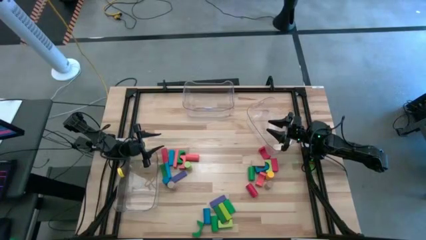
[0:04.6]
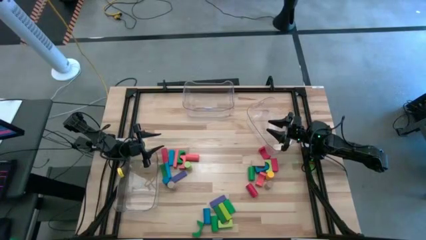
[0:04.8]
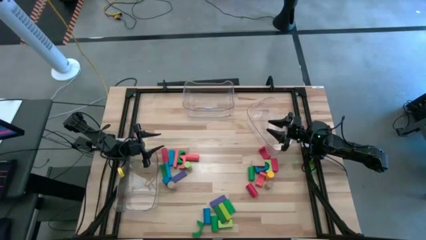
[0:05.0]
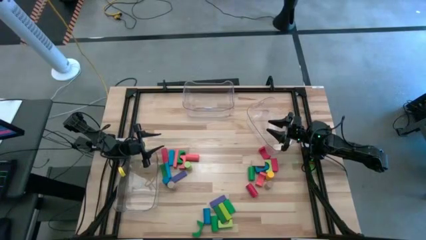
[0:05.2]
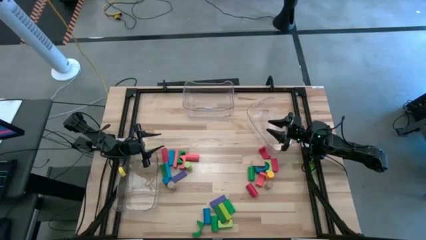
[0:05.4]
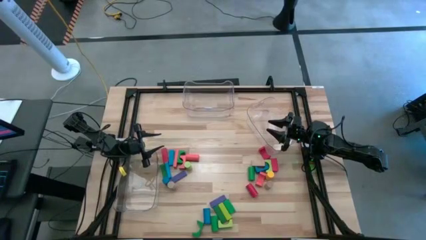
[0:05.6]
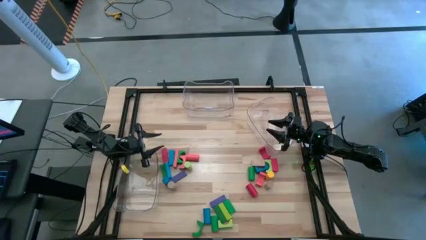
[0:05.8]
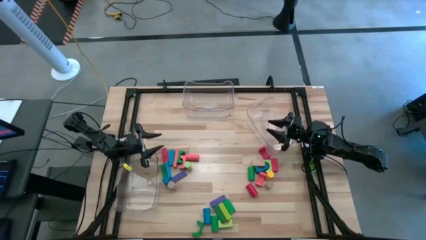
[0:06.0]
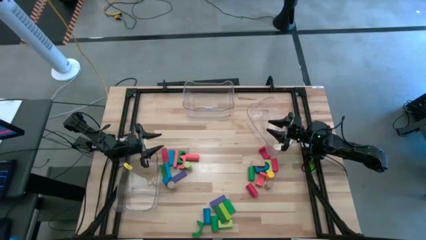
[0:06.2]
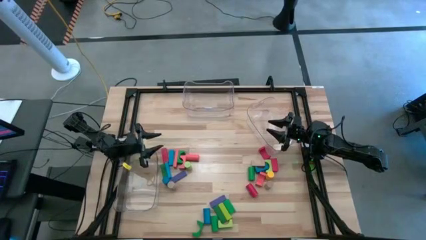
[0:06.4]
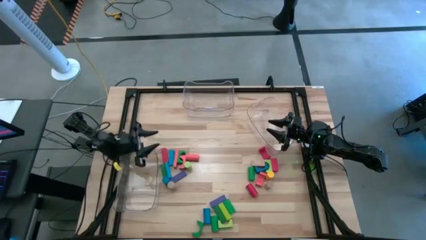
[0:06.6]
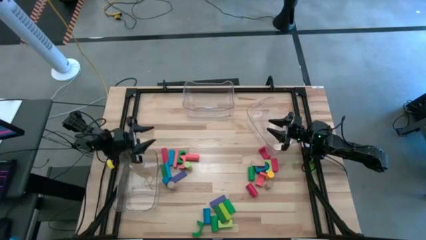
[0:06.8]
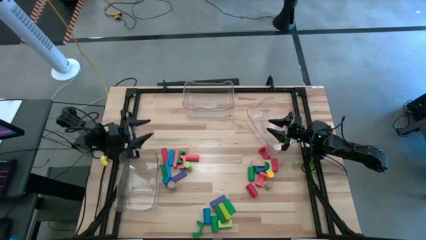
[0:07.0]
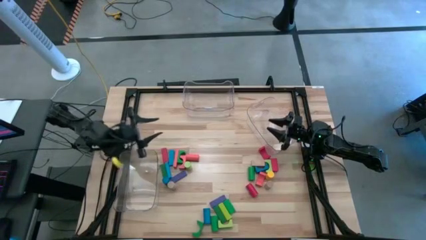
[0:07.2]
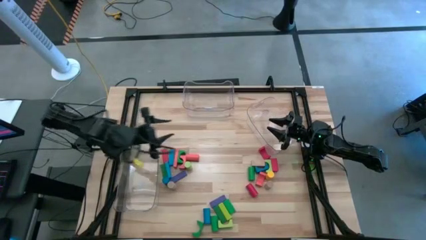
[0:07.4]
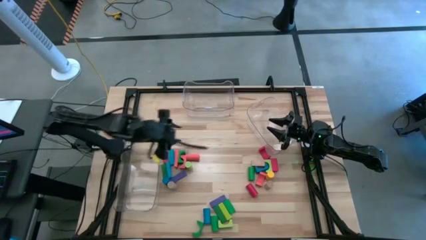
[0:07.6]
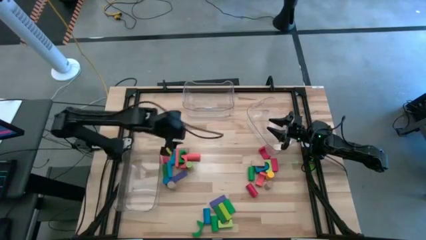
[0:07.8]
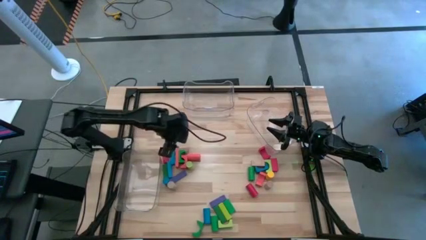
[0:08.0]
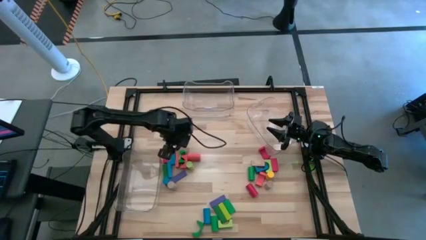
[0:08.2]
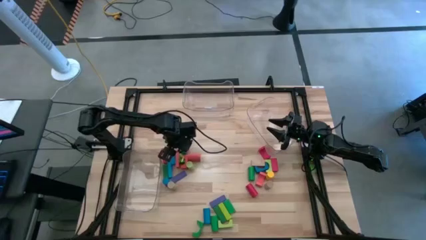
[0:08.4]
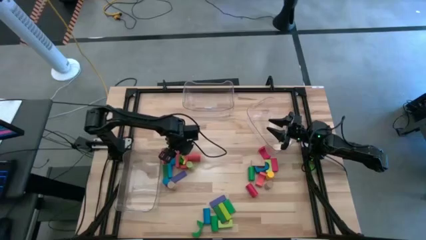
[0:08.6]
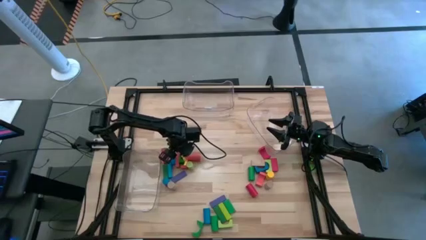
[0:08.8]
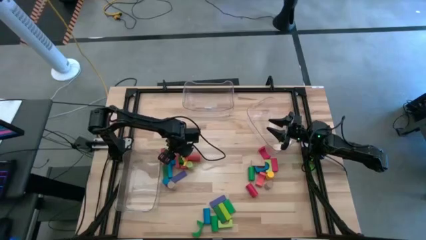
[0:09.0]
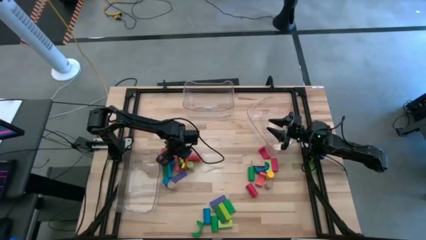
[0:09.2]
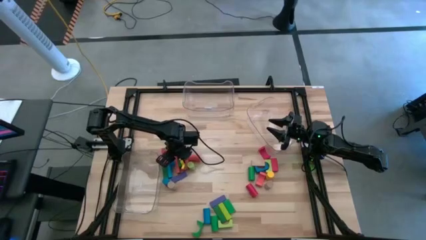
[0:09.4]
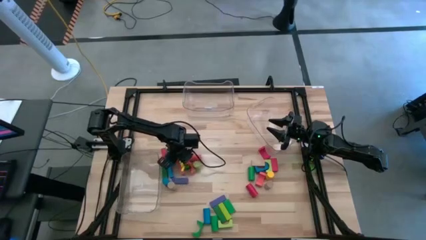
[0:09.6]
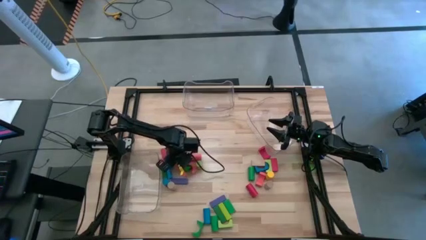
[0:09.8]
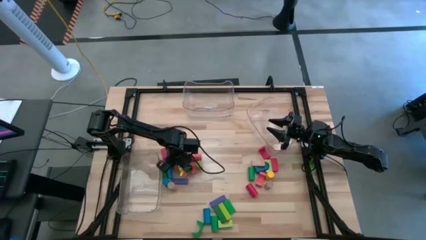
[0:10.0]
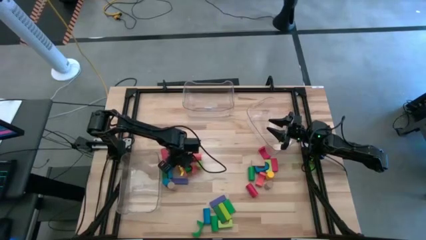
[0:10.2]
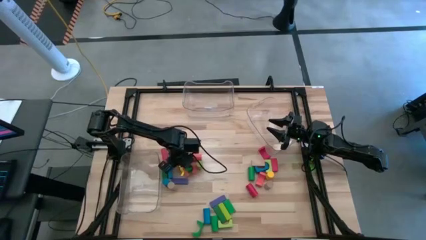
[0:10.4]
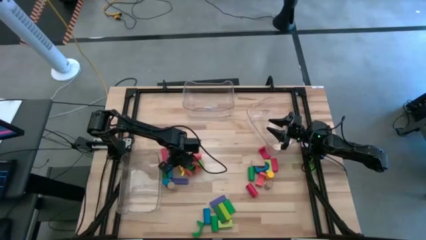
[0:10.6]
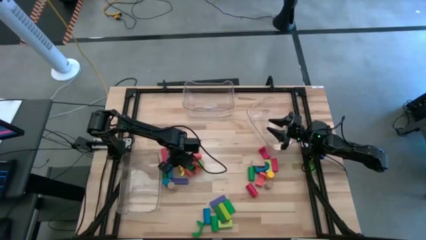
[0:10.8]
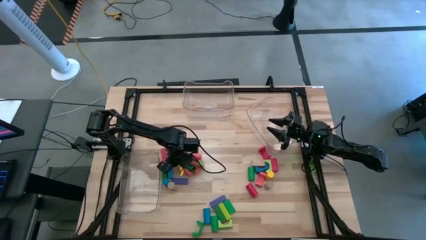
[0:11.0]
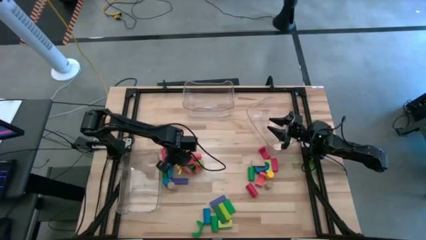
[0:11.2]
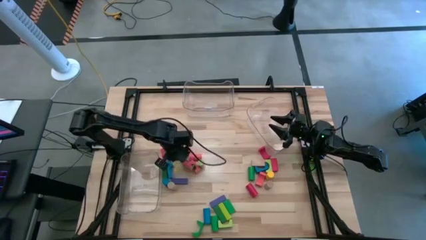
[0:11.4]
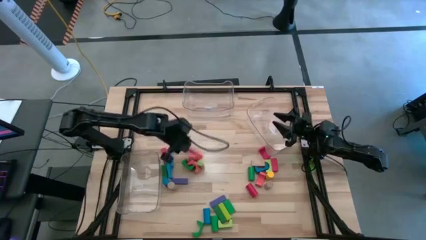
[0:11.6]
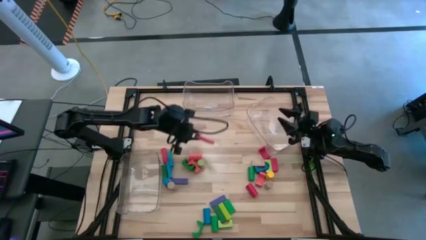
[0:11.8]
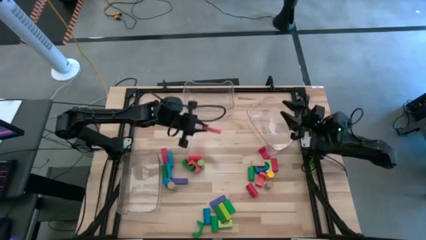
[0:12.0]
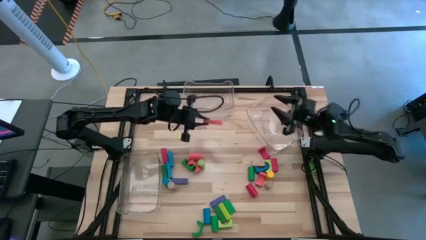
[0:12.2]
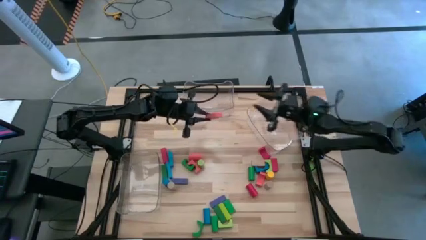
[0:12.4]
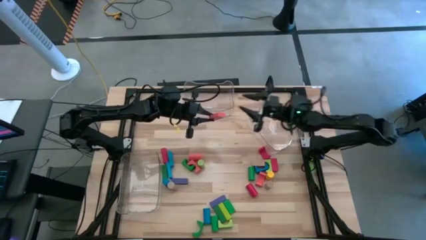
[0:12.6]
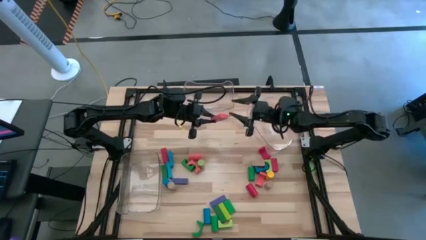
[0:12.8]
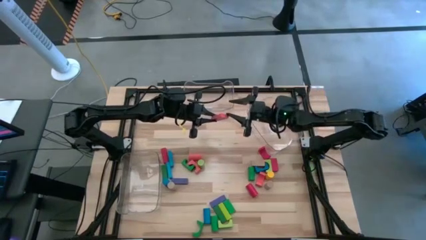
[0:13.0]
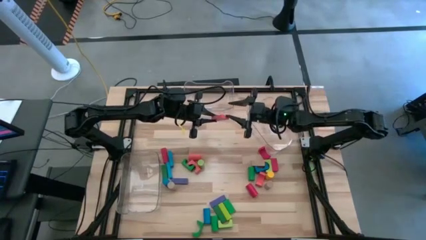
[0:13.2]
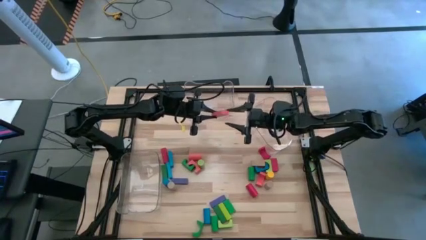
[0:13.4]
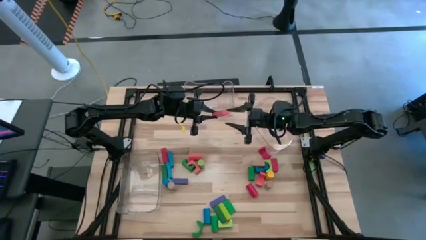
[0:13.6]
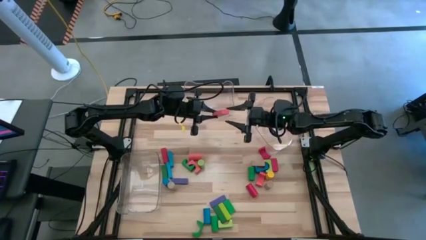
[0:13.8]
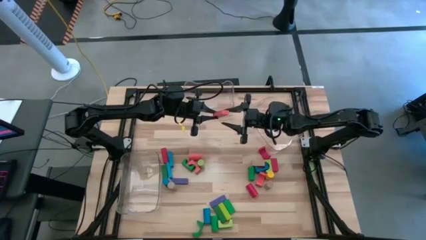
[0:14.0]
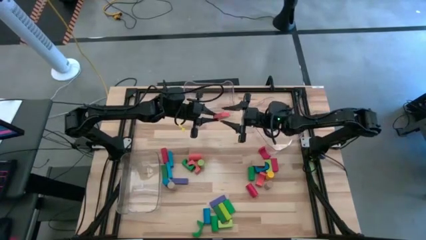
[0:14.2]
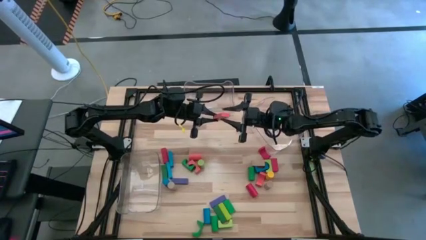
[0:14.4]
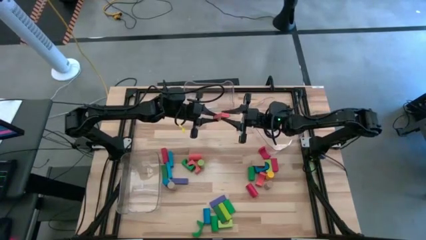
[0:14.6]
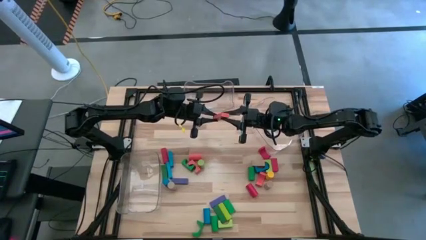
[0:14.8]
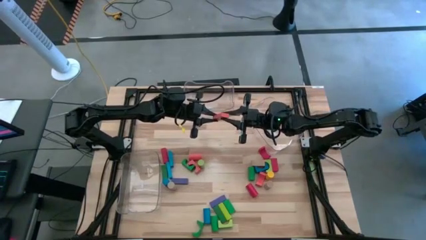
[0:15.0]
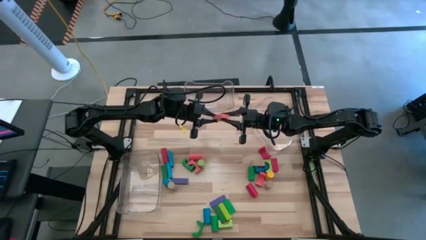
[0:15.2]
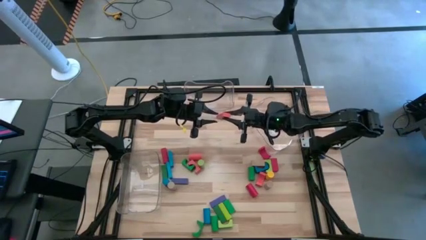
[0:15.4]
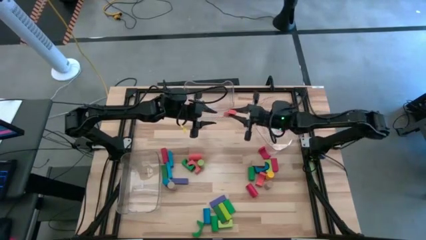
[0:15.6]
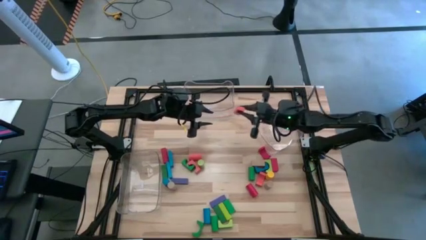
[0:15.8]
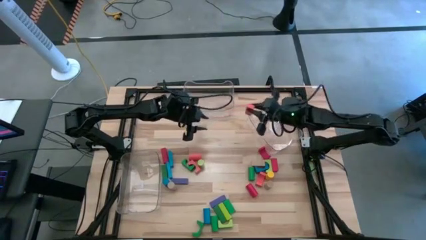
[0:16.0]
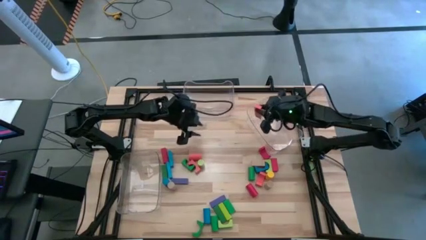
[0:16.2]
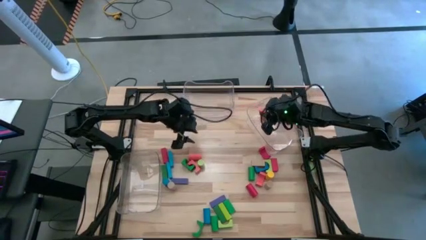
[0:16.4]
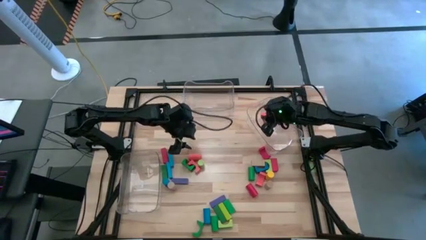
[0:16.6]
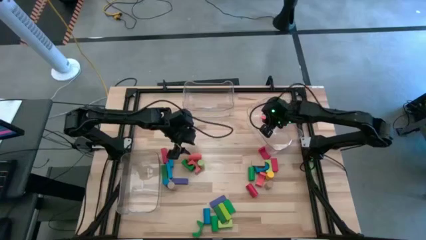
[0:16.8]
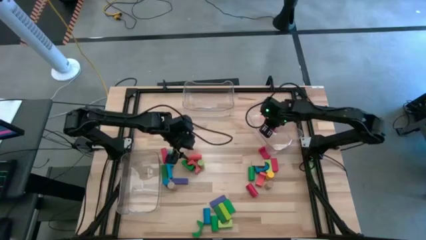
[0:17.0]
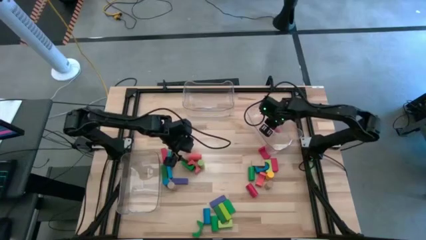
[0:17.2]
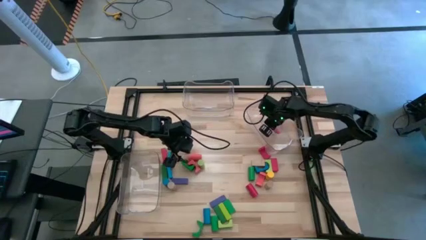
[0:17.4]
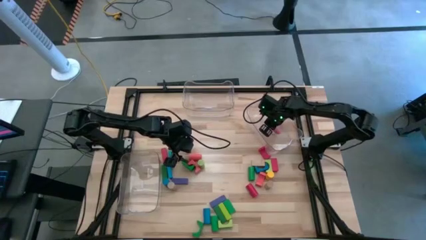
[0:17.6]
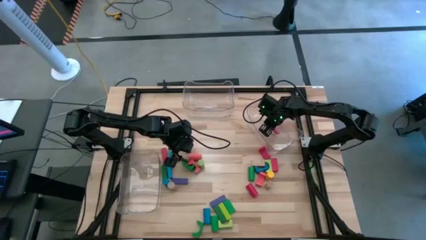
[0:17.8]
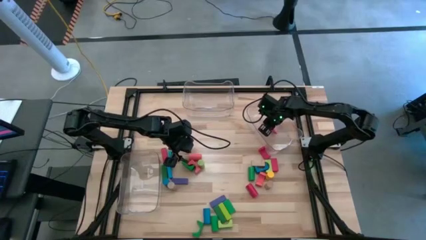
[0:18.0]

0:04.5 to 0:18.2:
Task: Sort blocks by size
Put the orange rectangular block into the right transparent bin
